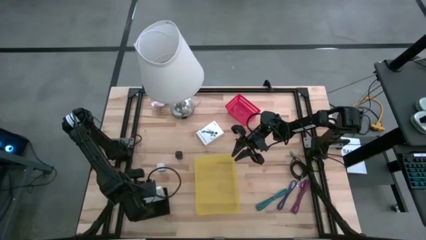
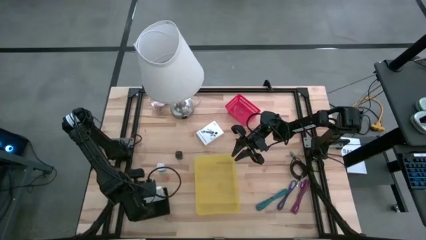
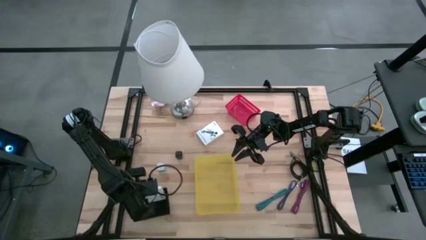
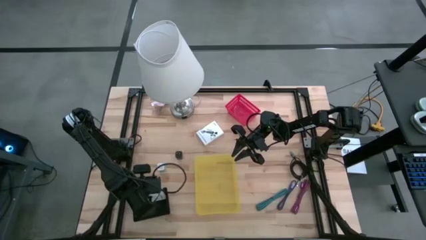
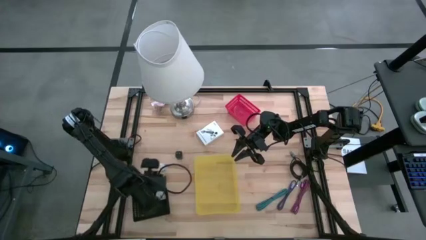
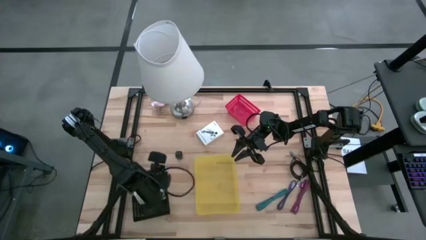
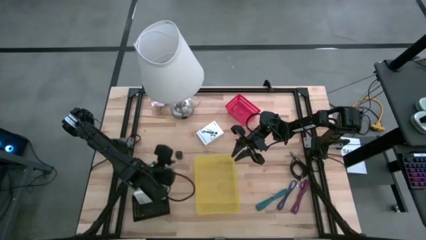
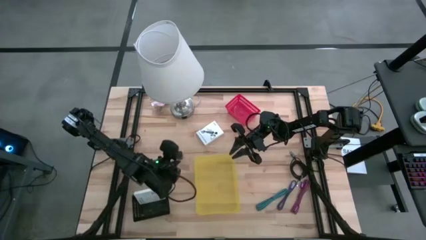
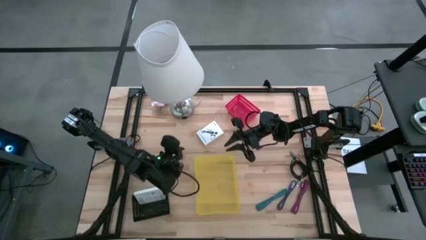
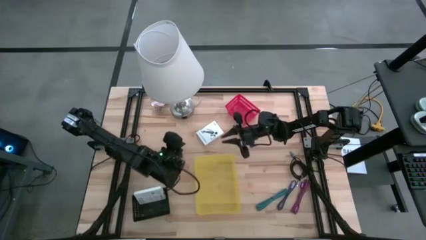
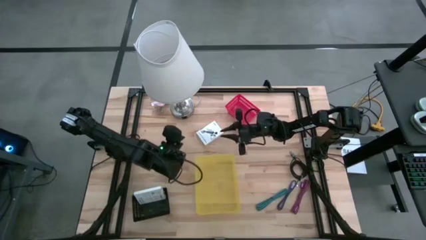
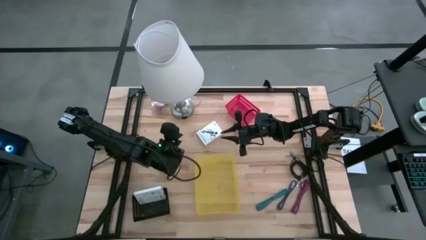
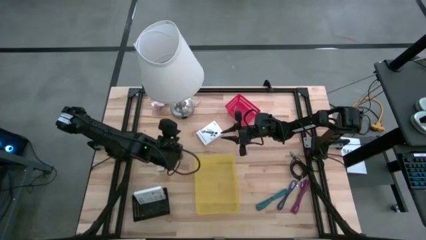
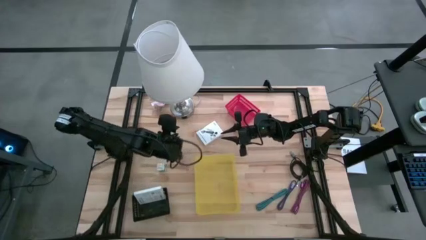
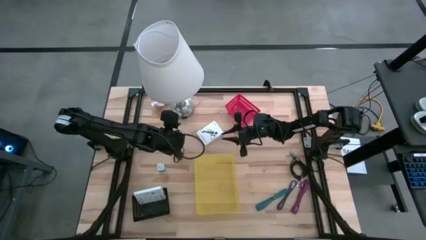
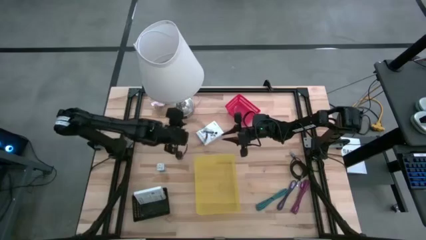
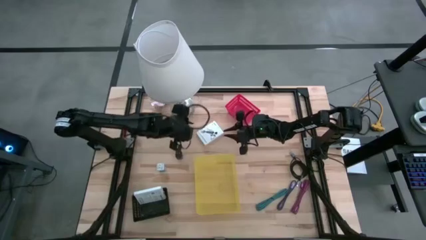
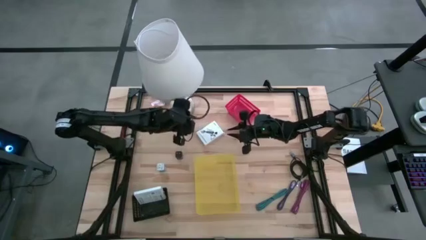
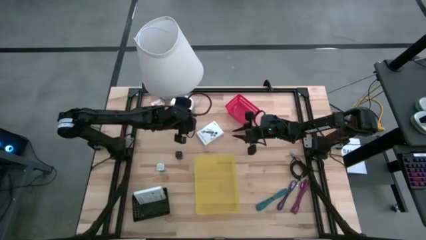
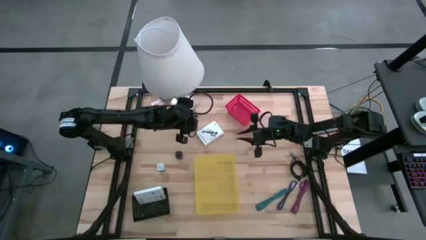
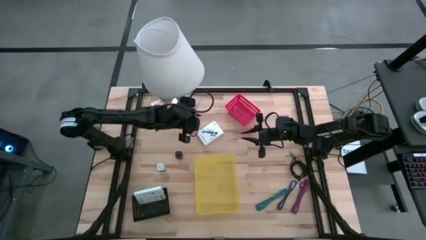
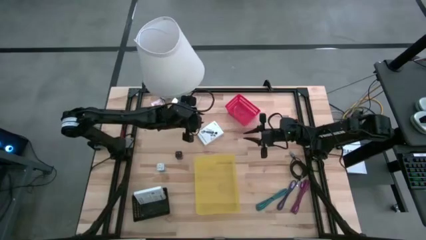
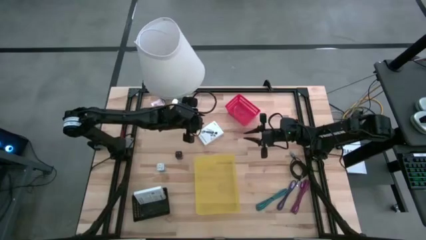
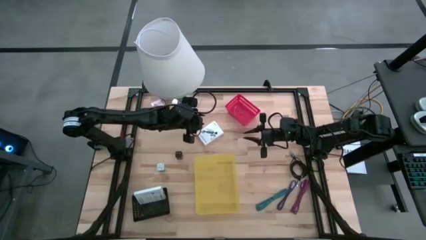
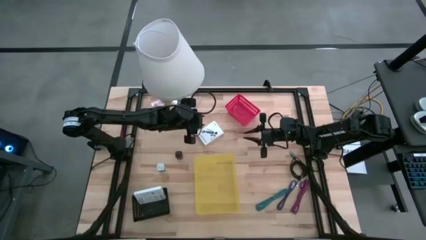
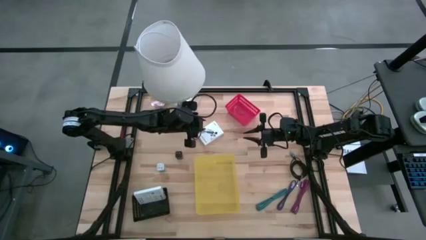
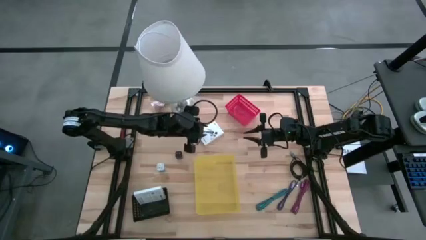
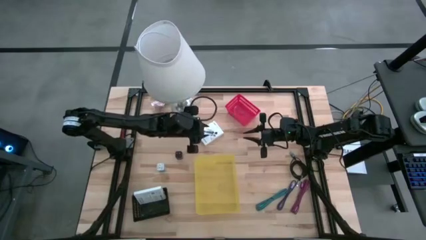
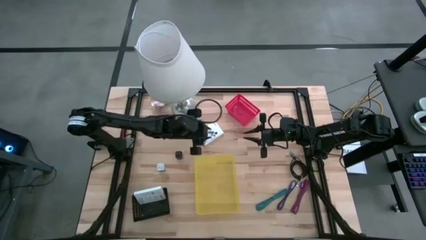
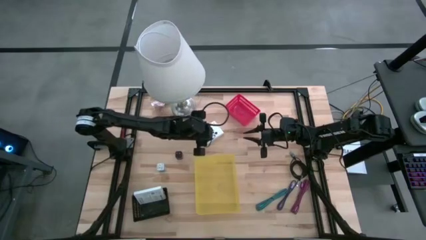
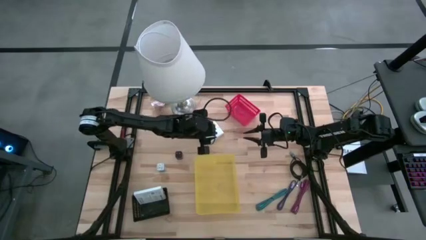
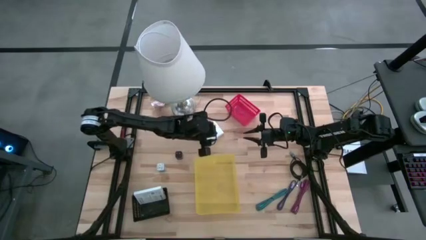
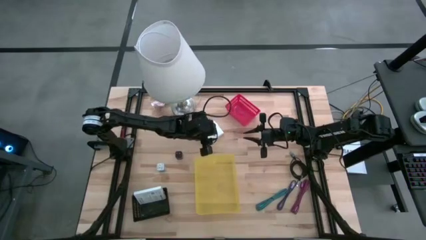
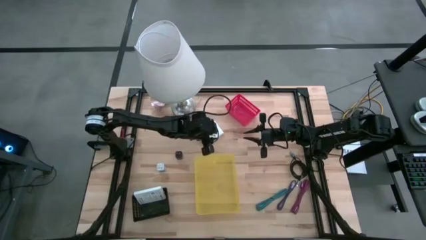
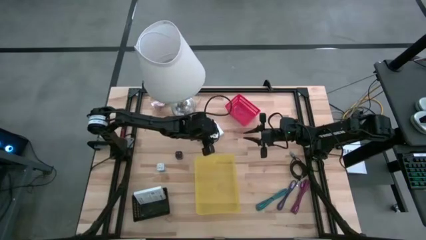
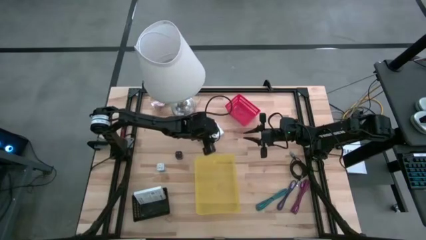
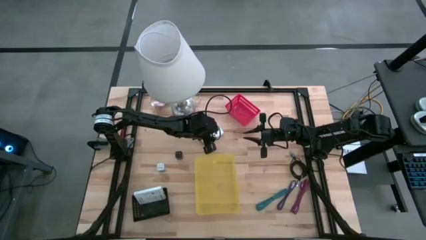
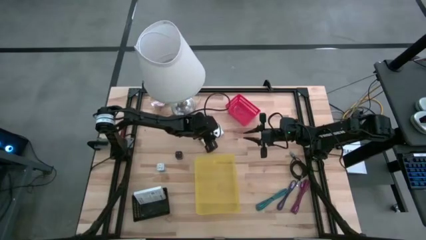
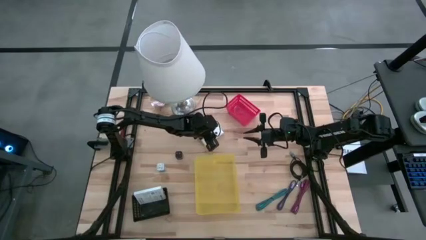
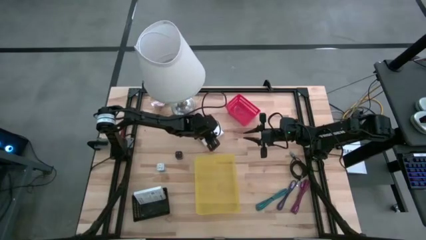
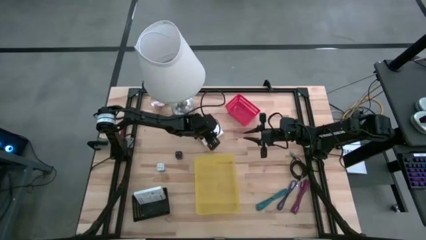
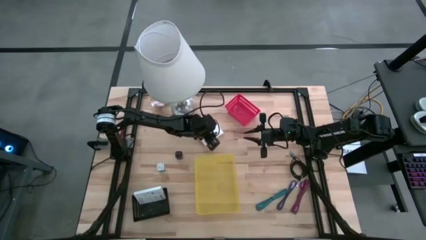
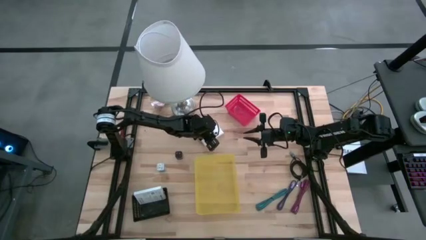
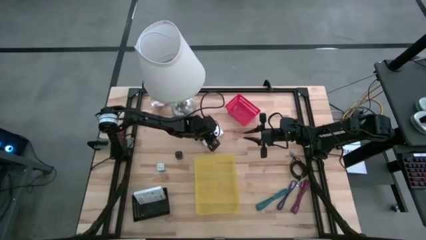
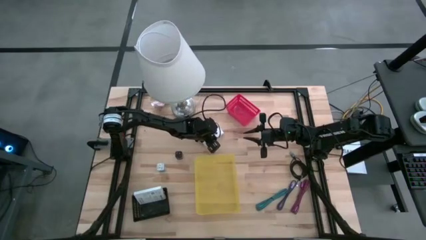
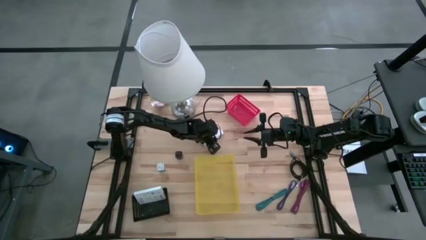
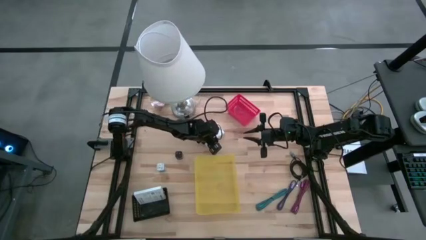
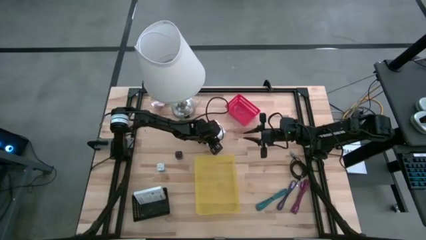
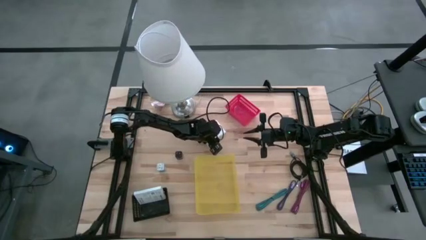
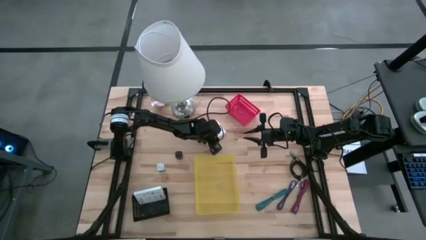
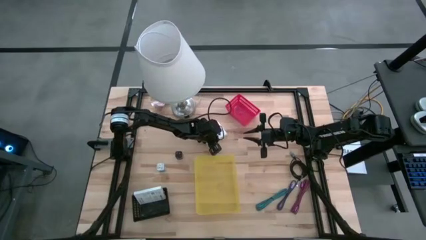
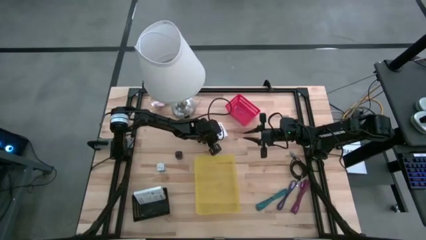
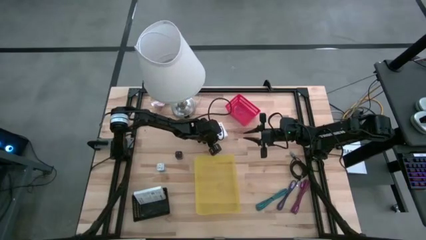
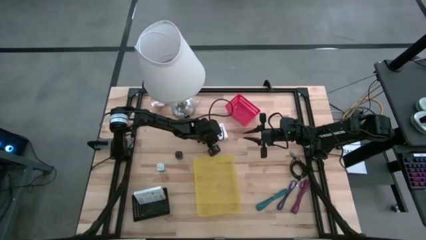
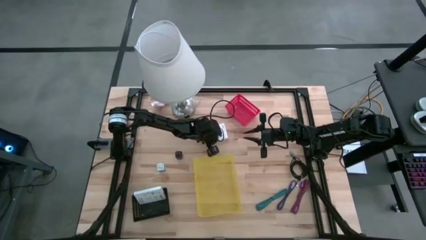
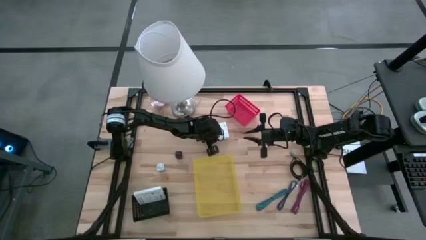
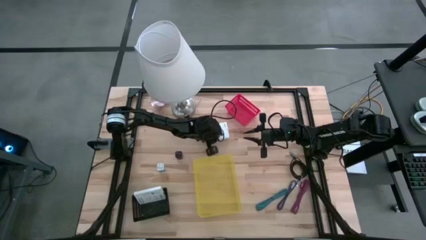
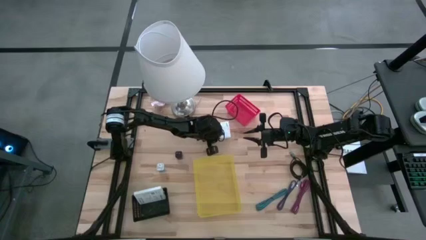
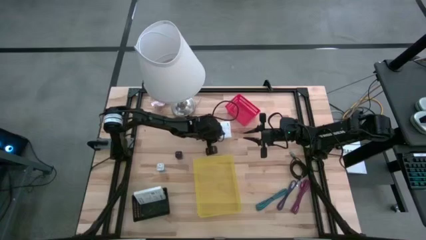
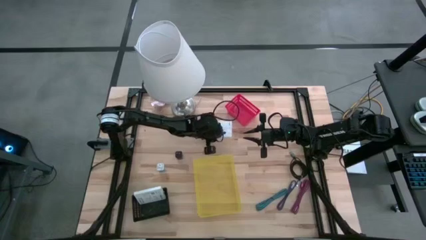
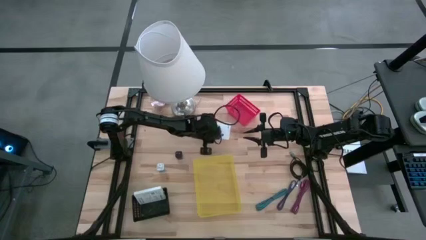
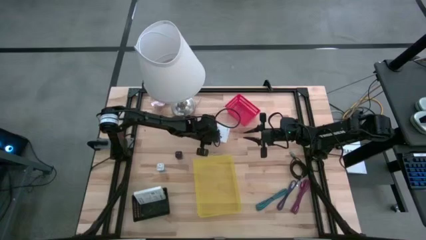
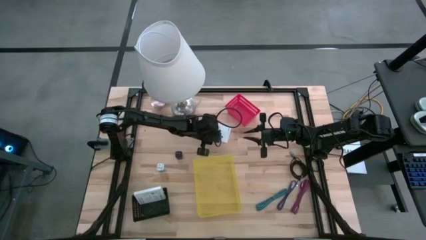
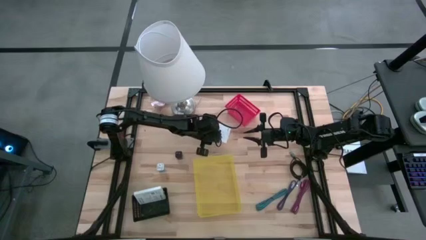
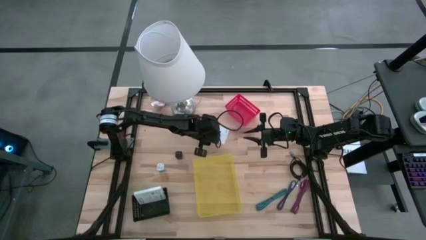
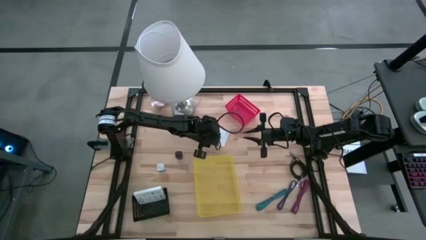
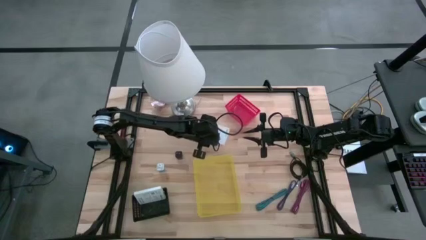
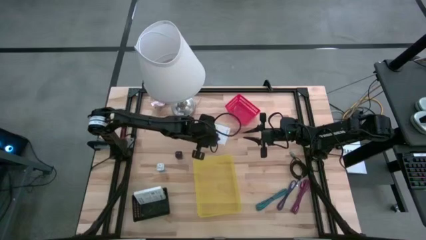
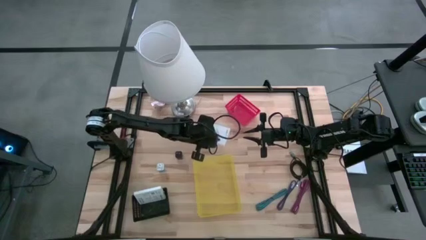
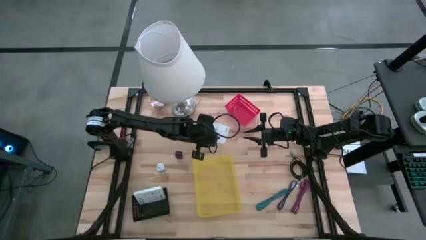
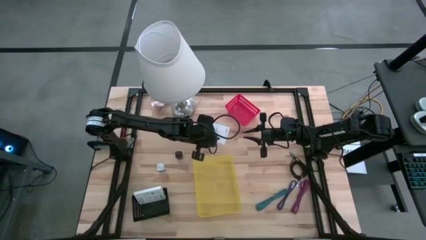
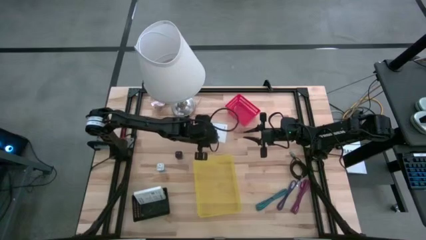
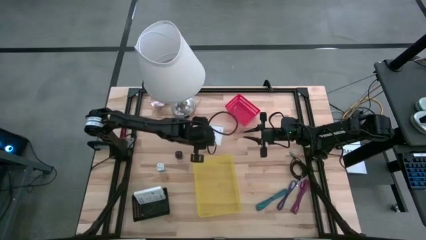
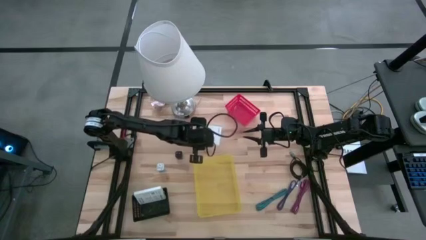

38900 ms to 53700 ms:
Task: Pick and place items into bin
Put the card reader box into the black bin
